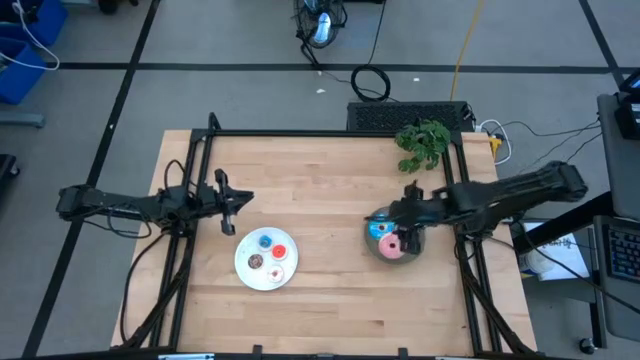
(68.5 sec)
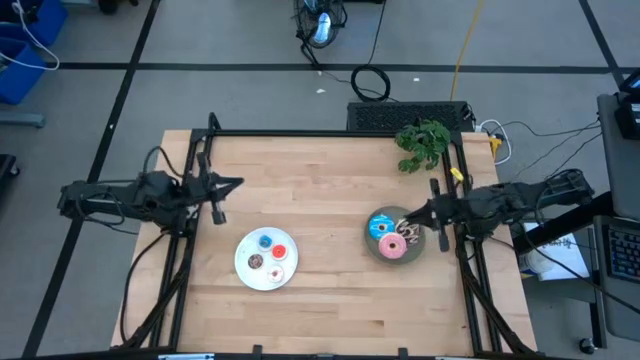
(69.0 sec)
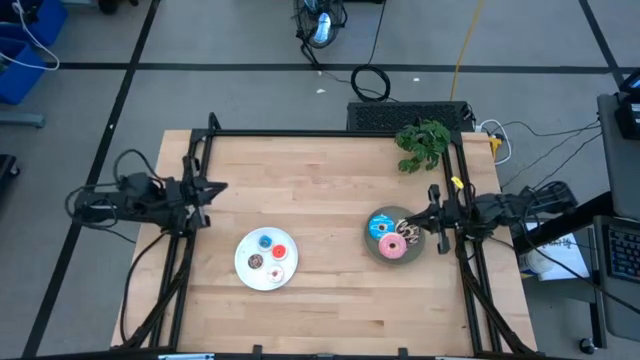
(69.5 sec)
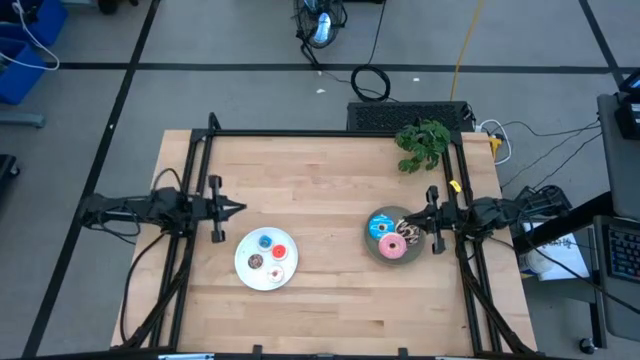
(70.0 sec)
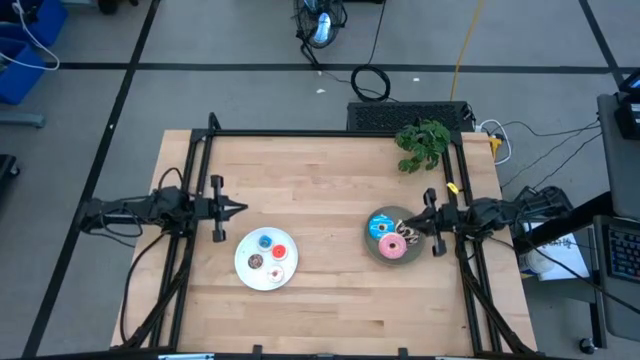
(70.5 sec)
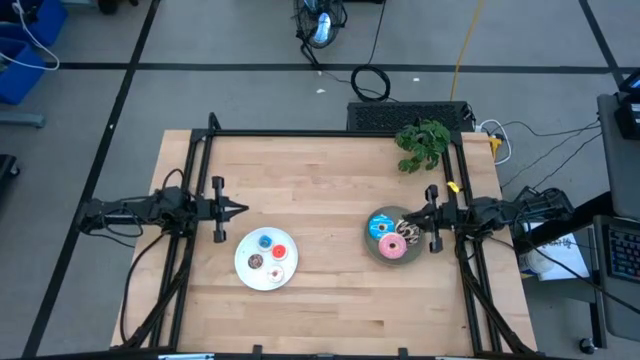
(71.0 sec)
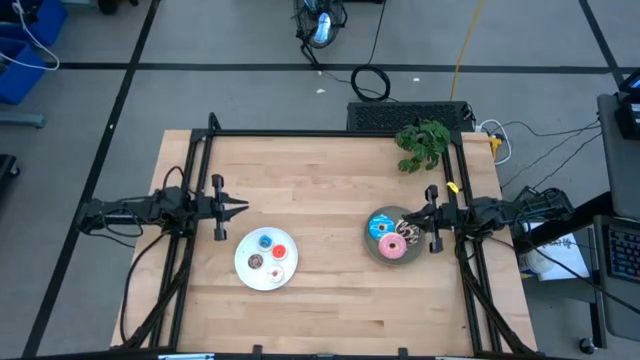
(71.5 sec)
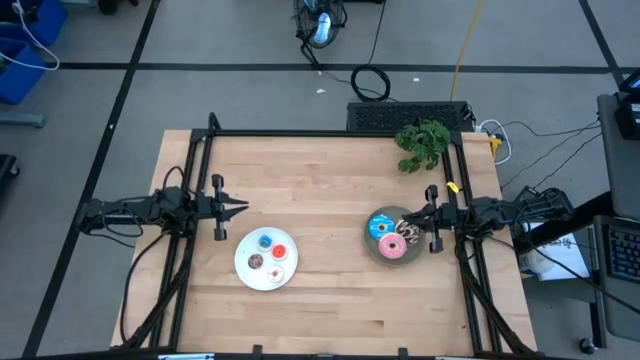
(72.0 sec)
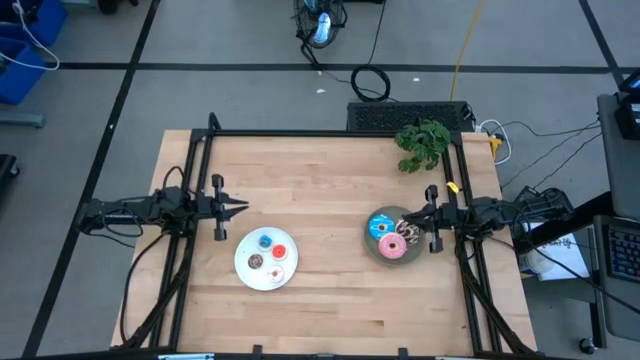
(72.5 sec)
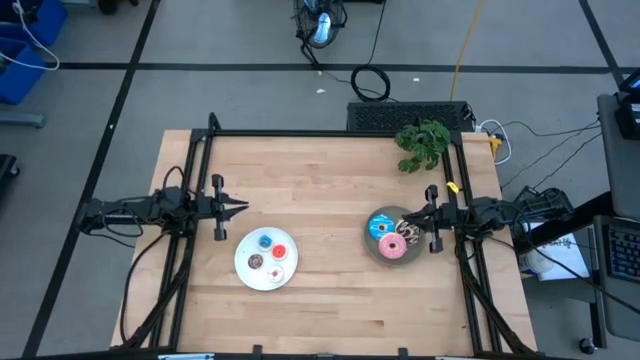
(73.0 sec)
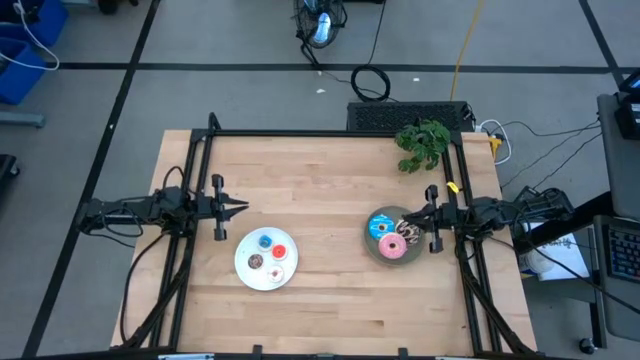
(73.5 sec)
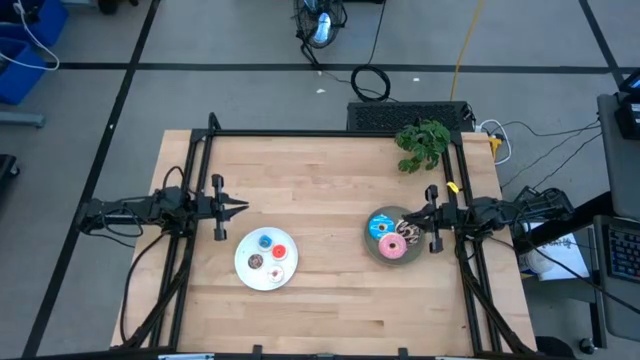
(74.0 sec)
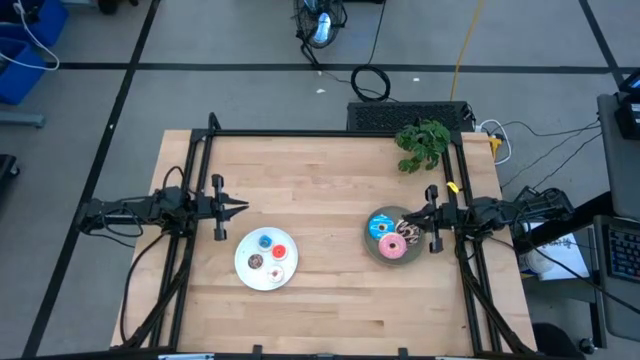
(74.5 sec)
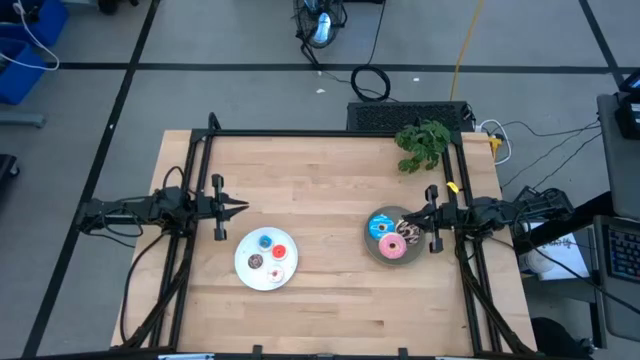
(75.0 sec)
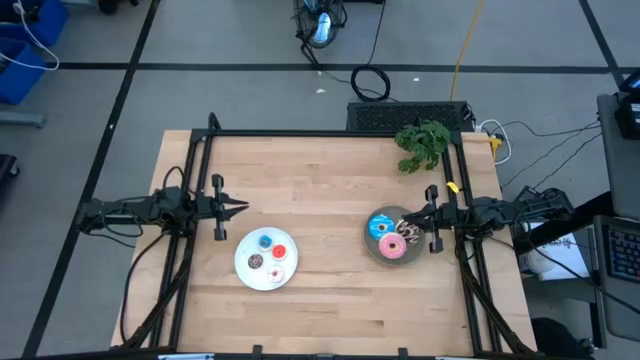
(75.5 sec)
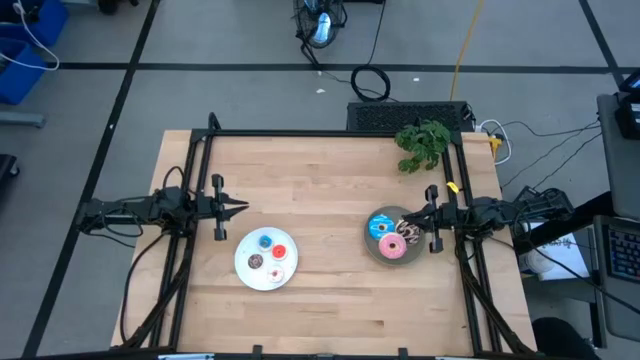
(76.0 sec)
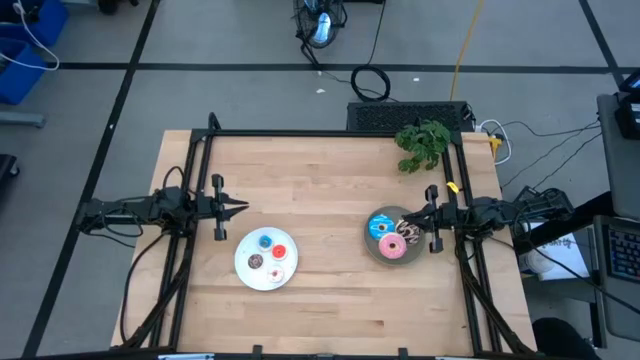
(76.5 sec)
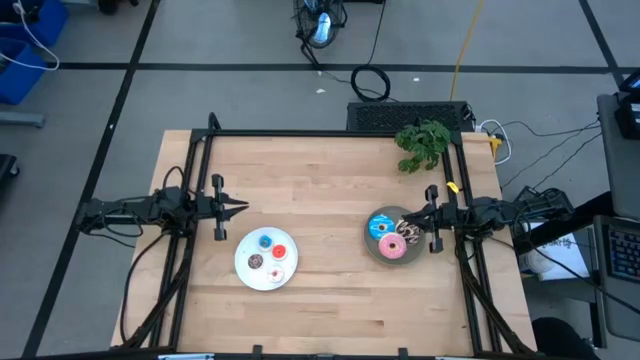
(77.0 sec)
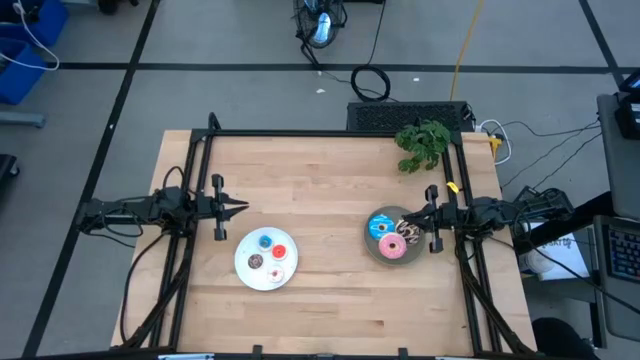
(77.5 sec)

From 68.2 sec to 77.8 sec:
Task: Pick & Place donuts
Return to Home Position

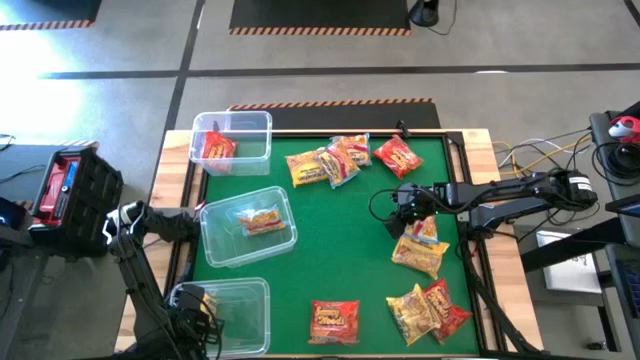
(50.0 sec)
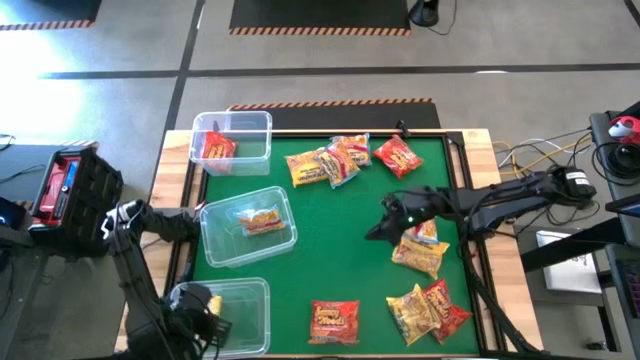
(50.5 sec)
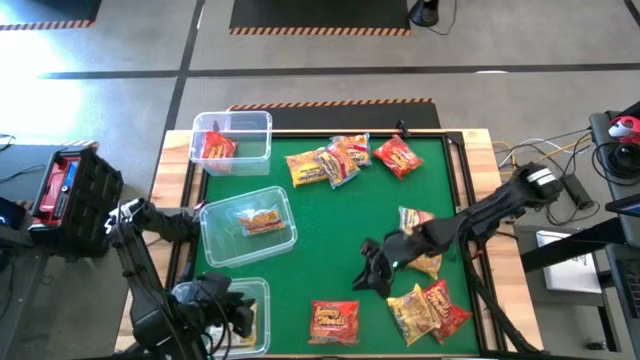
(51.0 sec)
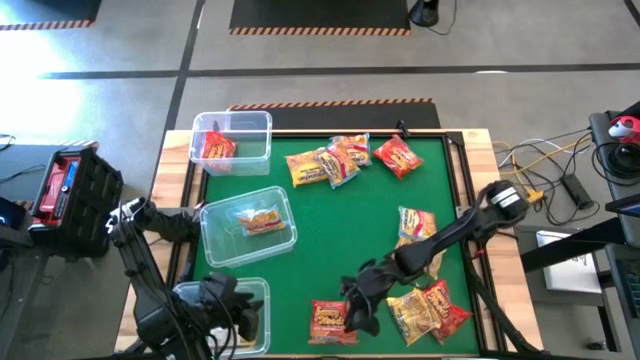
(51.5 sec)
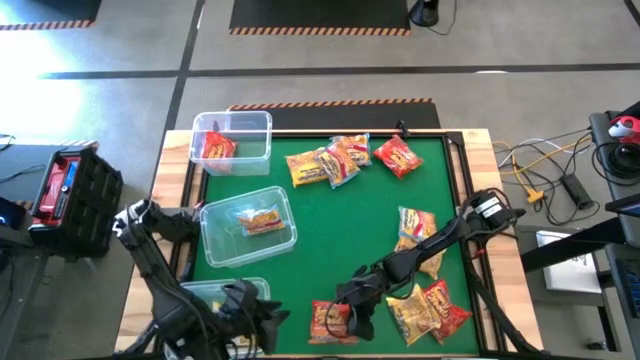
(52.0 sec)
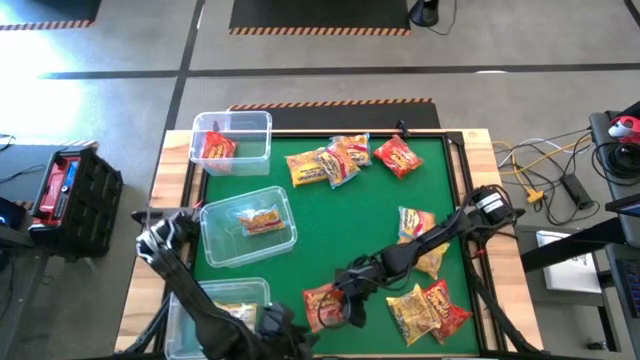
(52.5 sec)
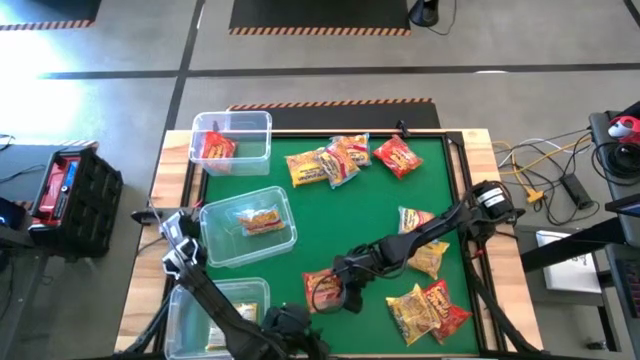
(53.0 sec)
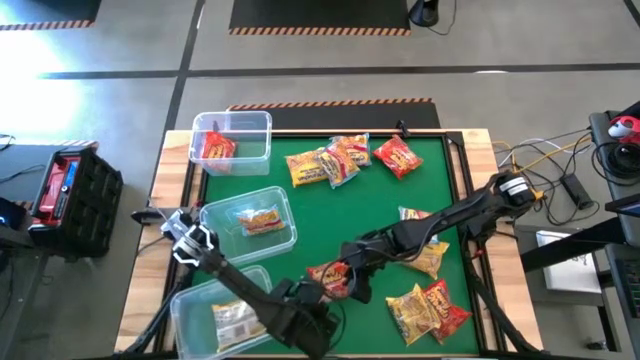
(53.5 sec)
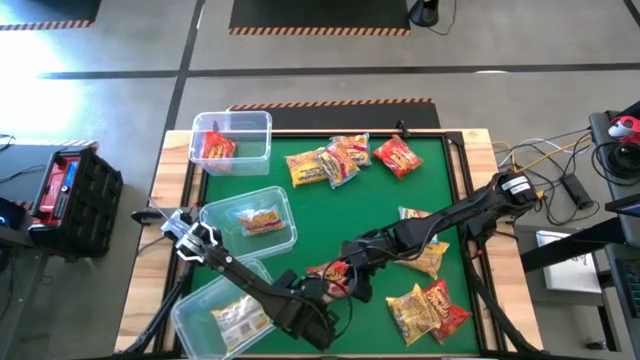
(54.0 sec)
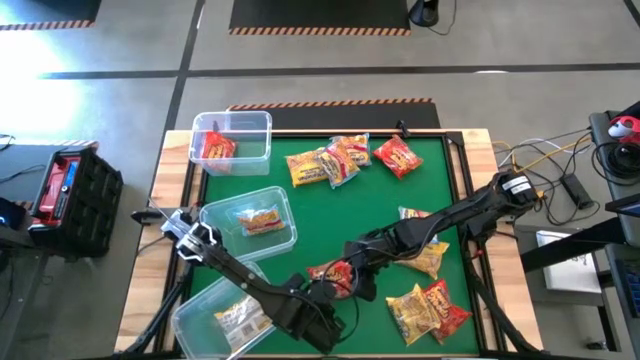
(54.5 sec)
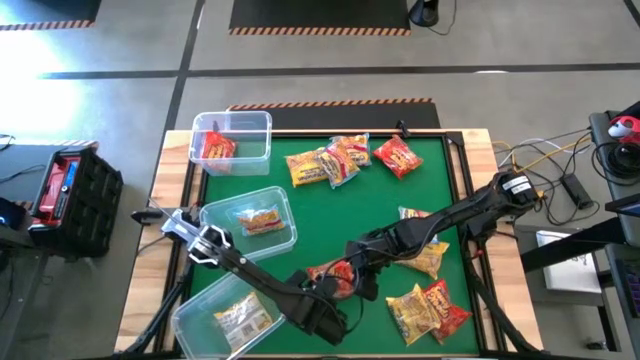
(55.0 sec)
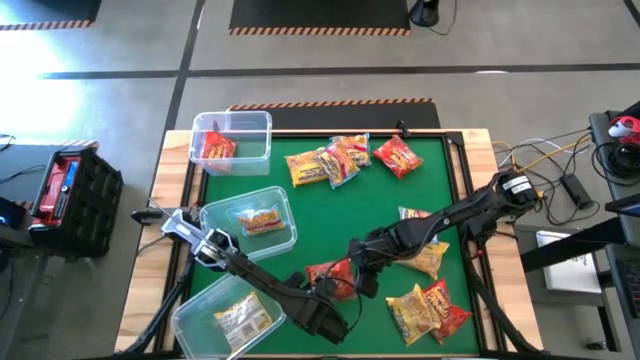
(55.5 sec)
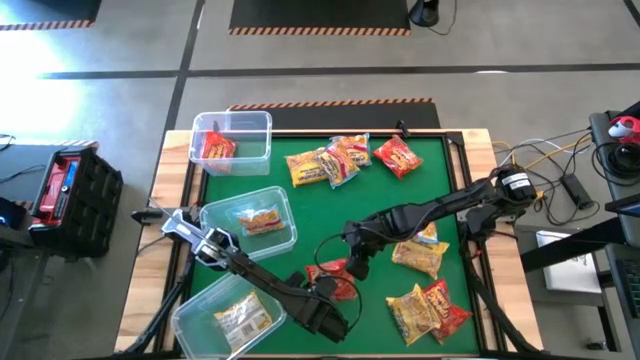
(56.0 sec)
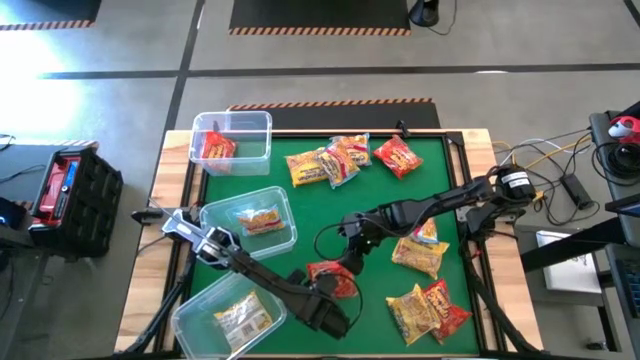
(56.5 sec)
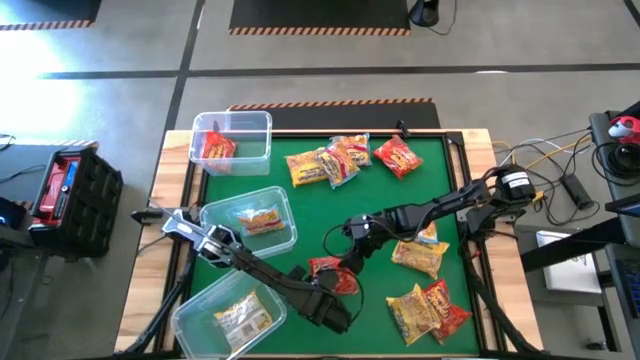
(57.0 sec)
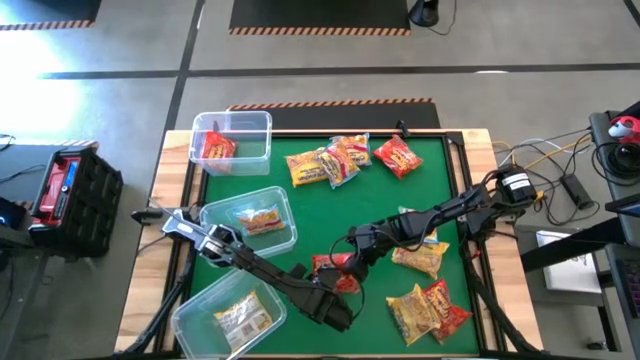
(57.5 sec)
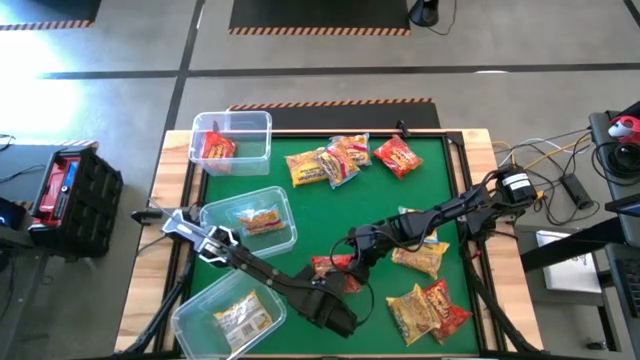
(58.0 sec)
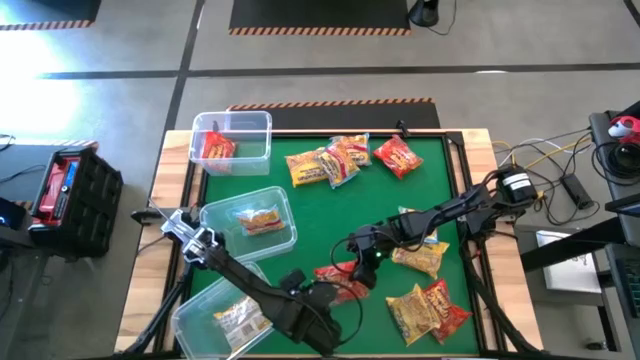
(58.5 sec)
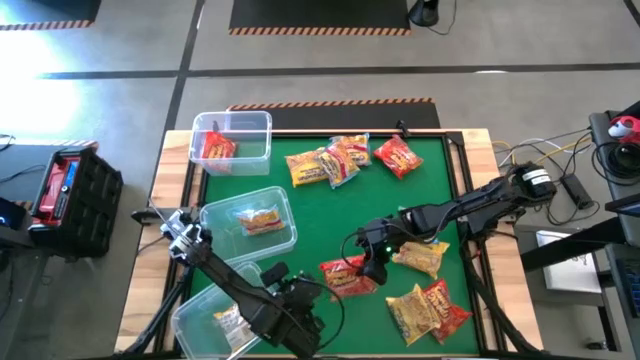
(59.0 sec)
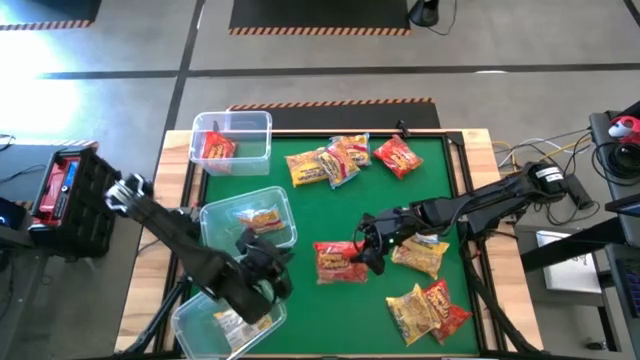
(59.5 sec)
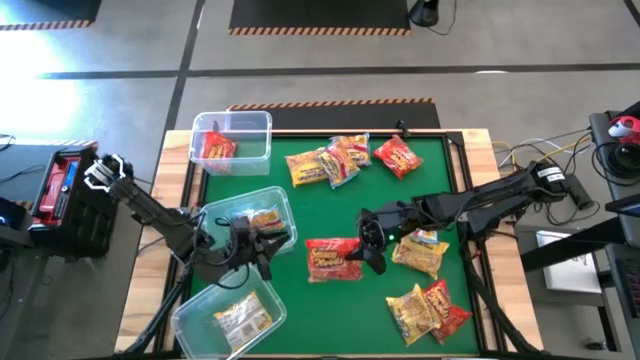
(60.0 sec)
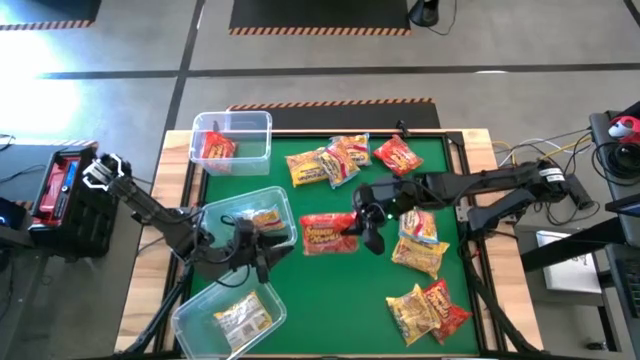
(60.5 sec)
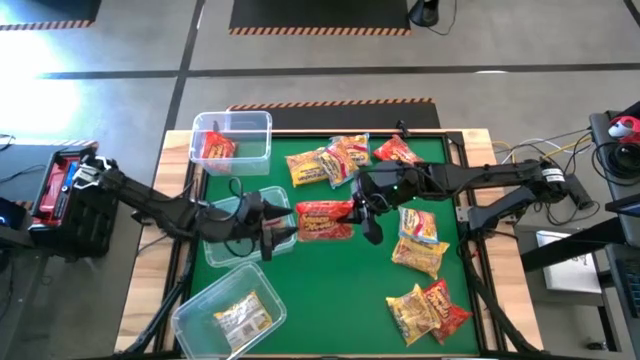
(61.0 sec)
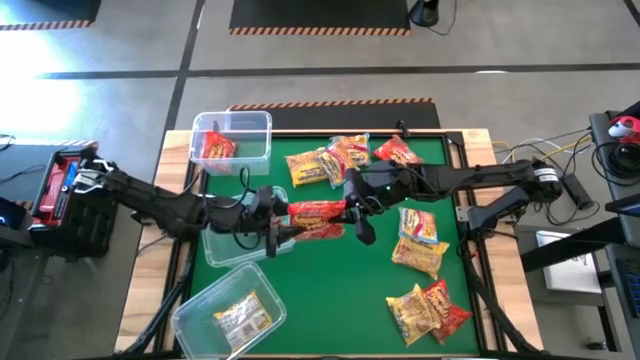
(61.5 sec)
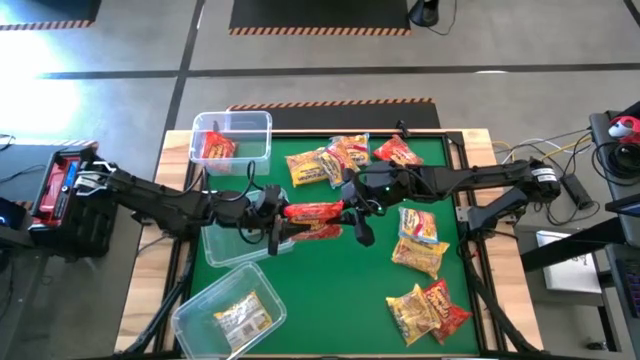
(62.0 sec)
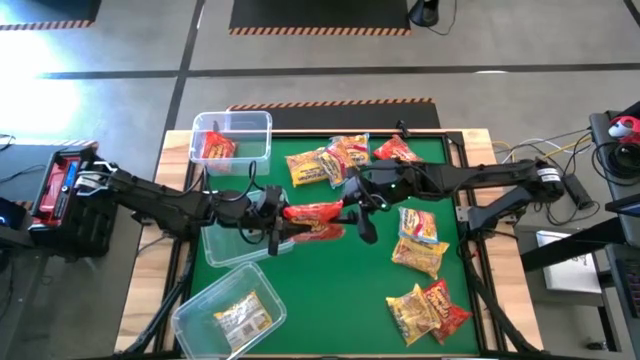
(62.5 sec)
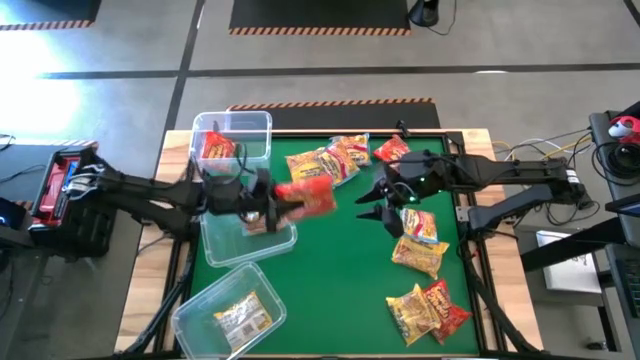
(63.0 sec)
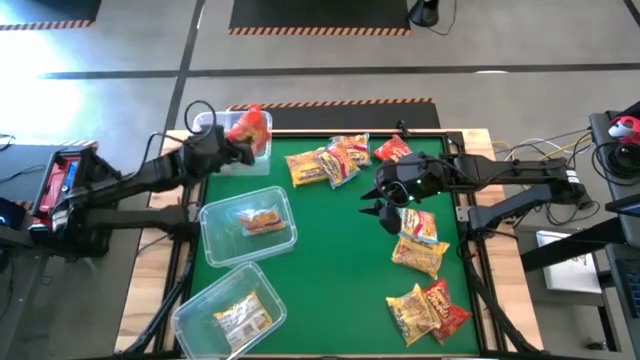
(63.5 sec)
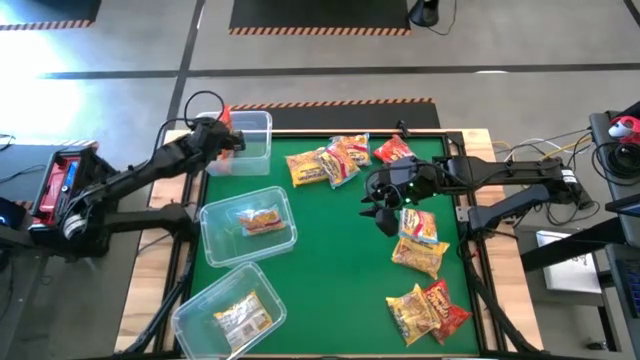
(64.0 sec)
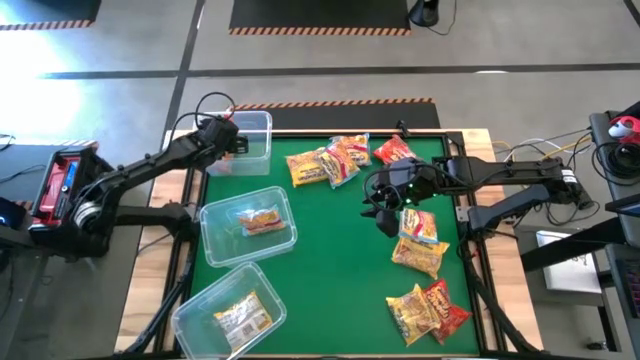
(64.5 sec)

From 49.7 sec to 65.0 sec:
Task: Sort Maruchan noodles
Put the bottom left orange noodle pack into the top transparent bin
